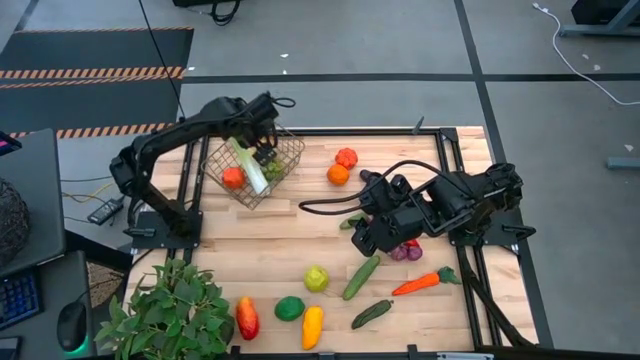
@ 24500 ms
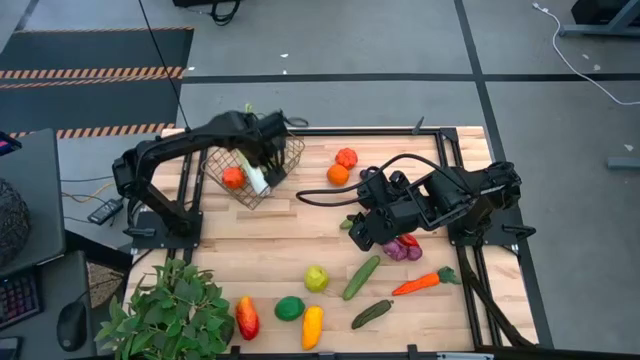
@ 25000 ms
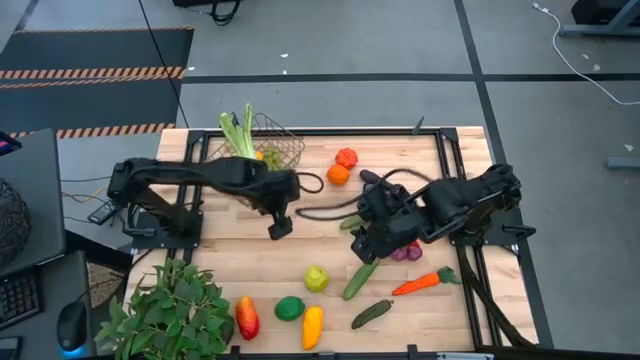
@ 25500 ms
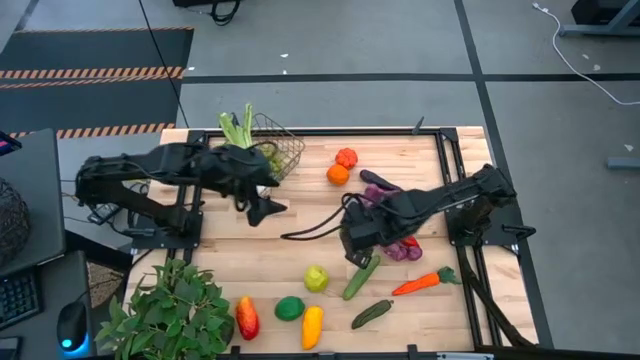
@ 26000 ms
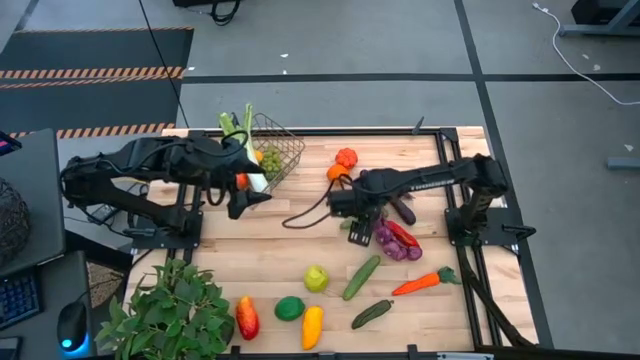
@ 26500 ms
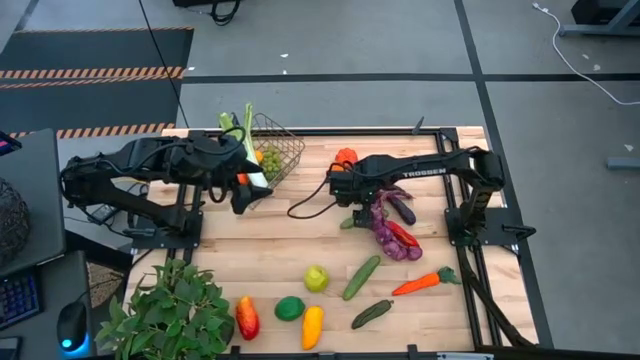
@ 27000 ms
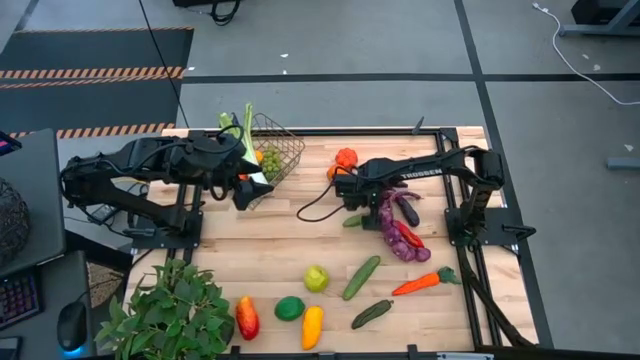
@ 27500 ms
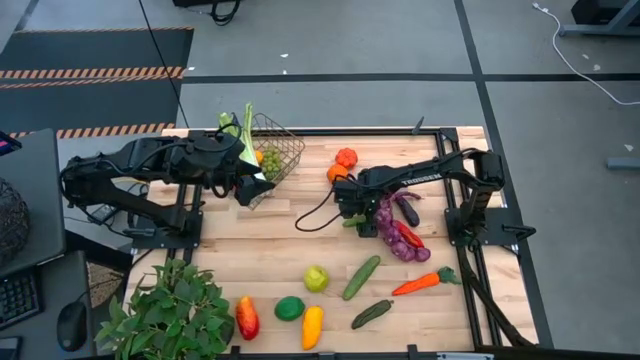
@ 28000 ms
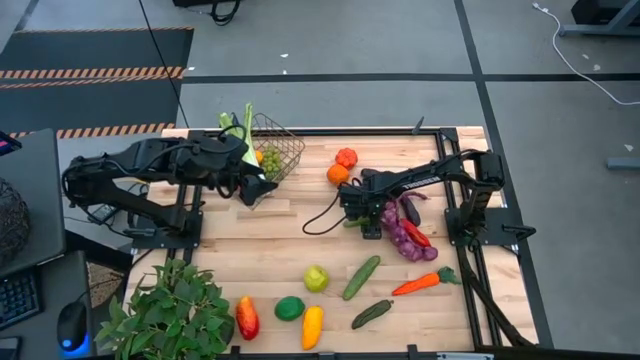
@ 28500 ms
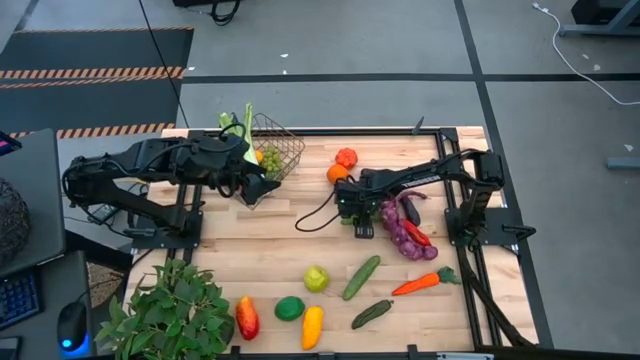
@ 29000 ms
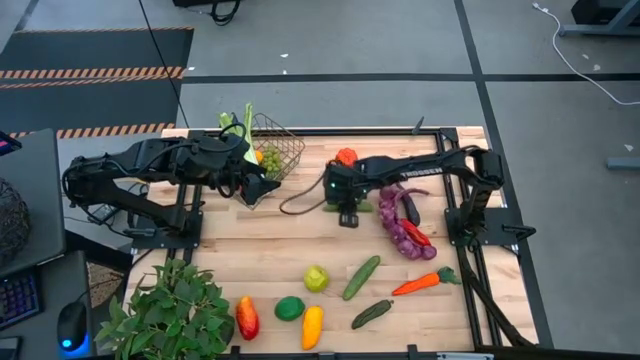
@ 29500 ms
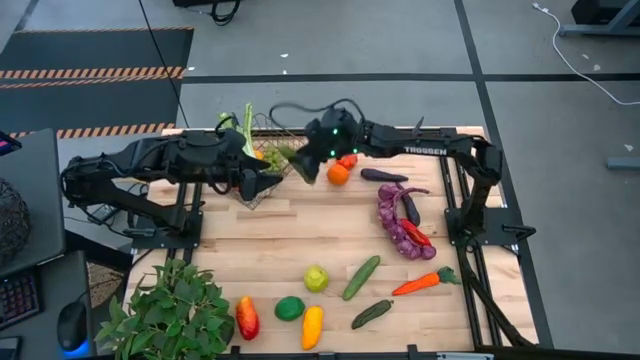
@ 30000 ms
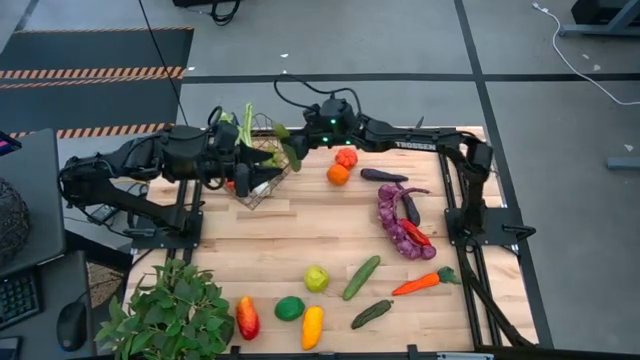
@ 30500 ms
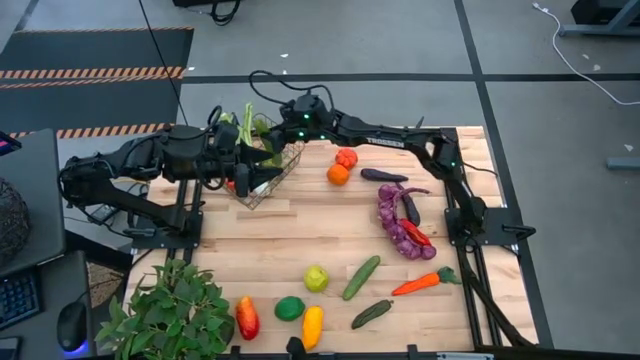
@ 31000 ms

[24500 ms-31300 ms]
Task: Build produce basket
Put the top cucumber into the wire basket

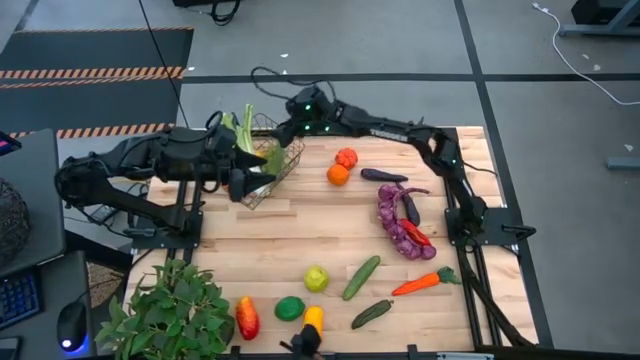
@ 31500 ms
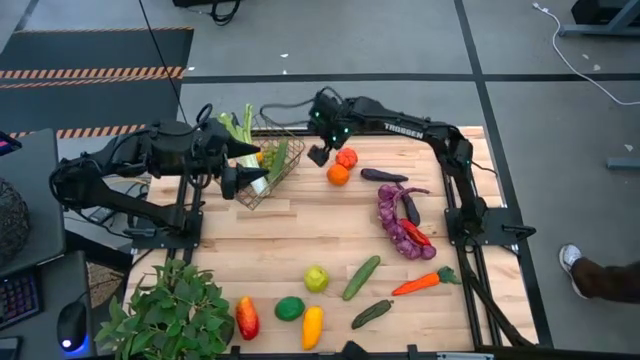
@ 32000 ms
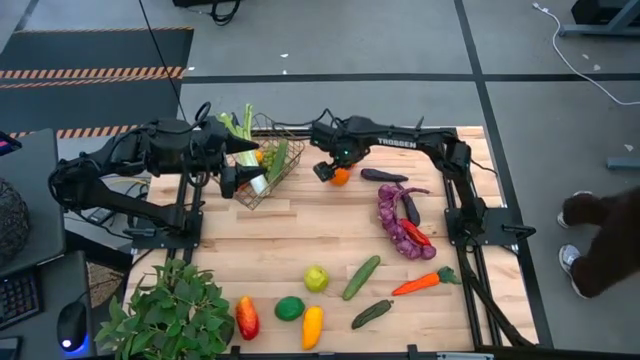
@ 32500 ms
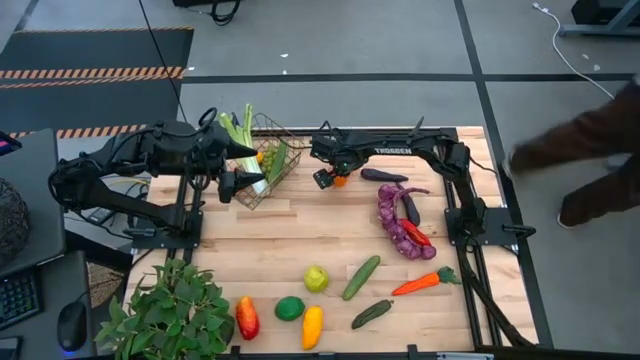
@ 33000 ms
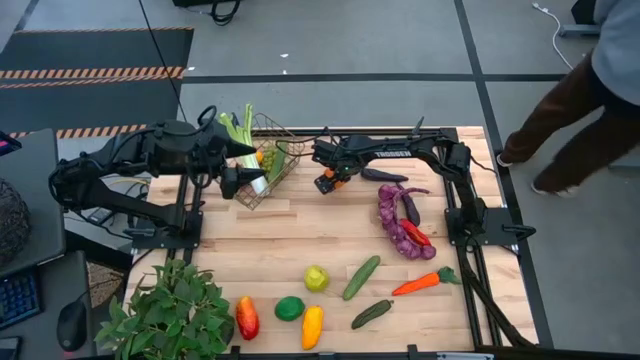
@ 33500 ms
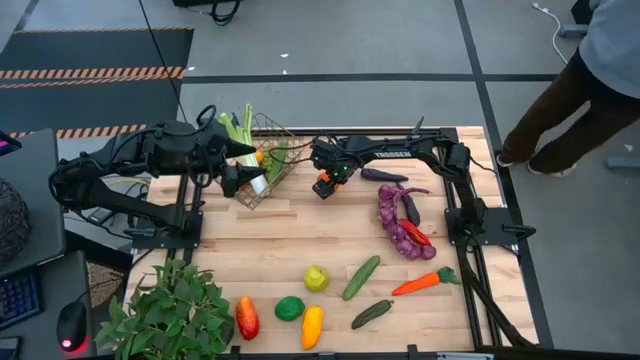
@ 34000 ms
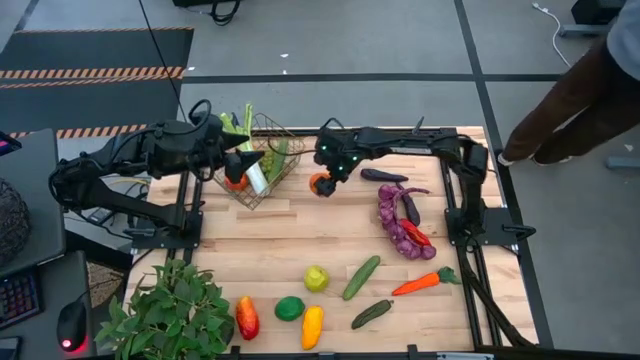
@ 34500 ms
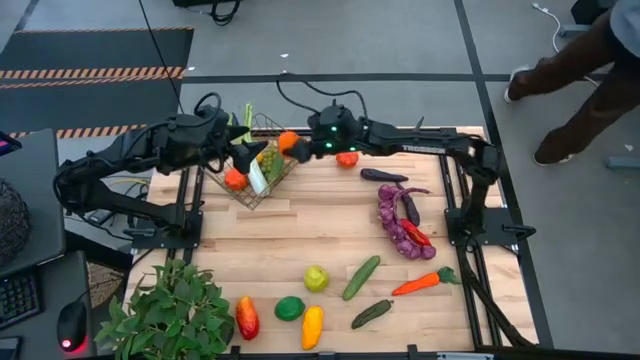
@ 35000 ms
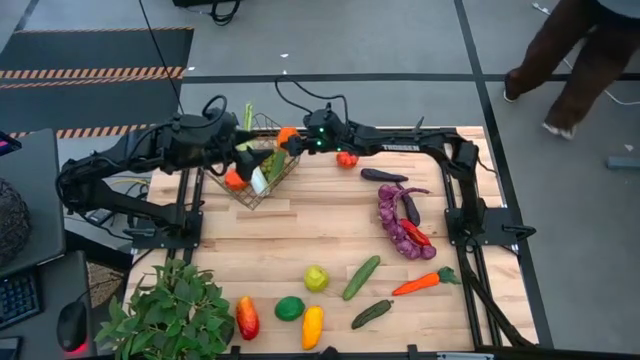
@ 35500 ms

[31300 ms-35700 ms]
Put the orange into the wire basket

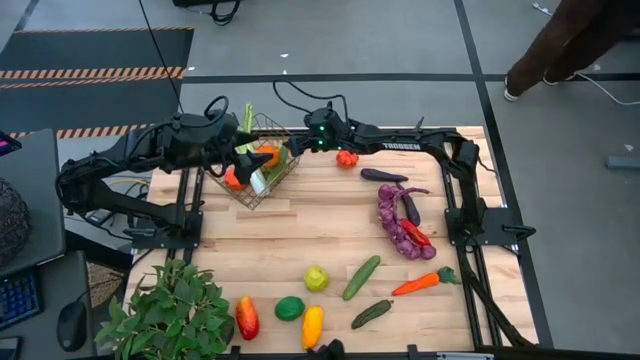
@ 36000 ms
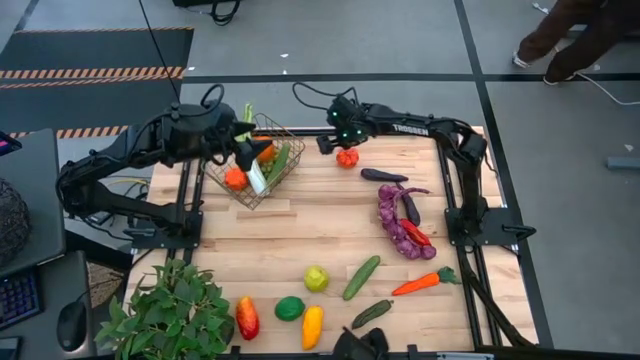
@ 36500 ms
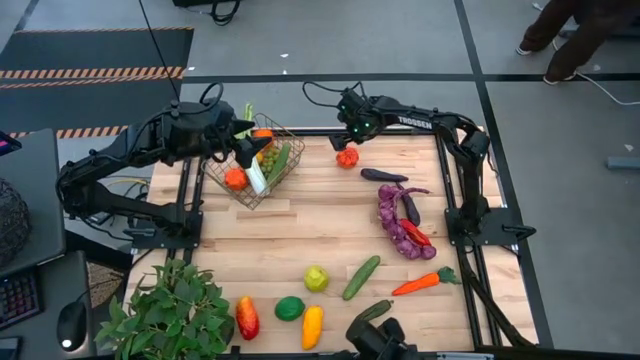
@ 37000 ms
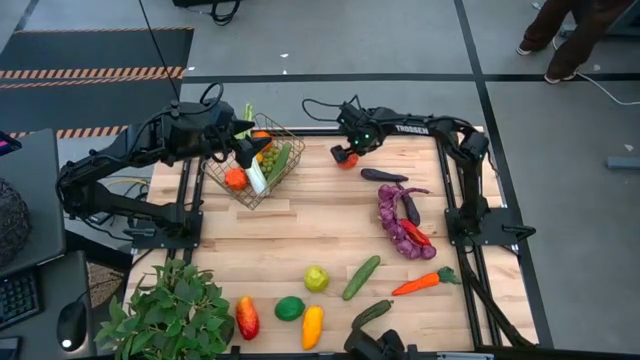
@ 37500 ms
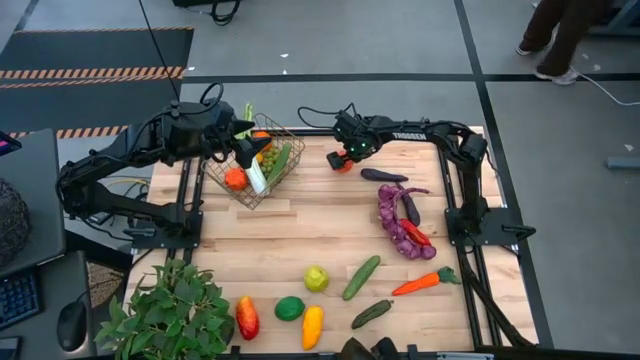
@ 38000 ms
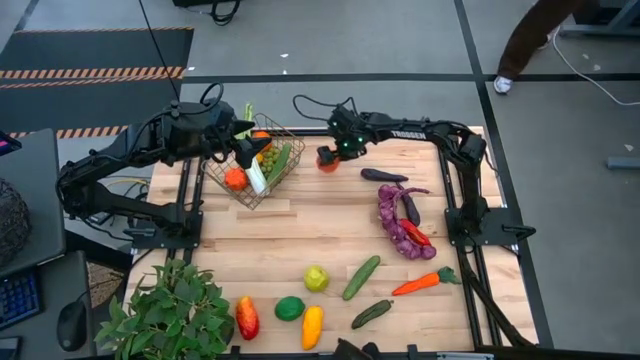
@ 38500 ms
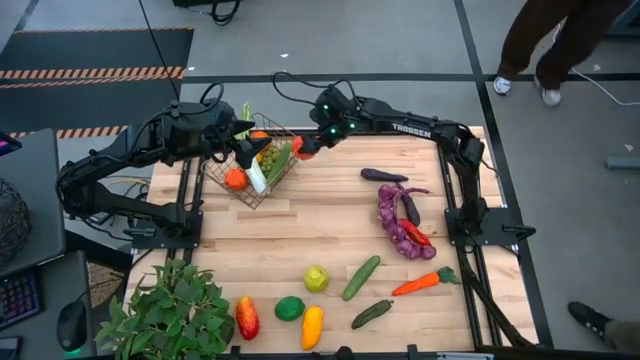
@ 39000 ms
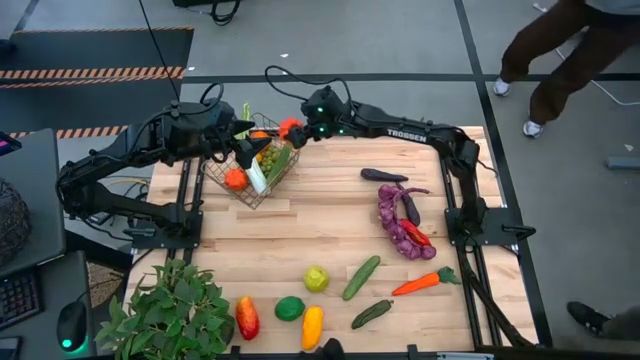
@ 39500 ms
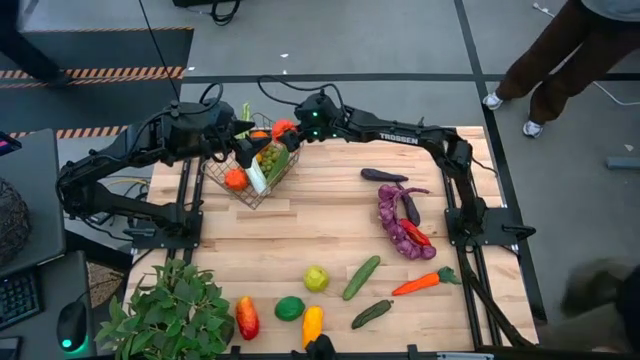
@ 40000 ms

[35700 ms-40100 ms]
Put the squash into the wire basket

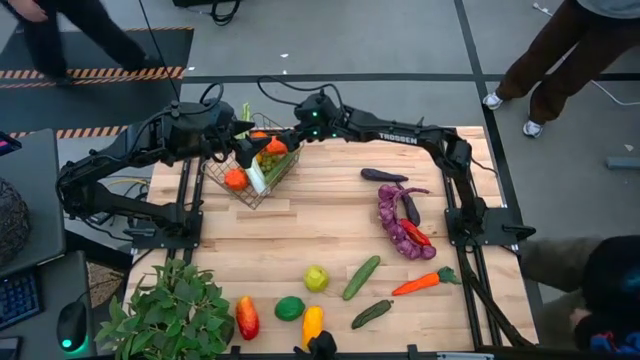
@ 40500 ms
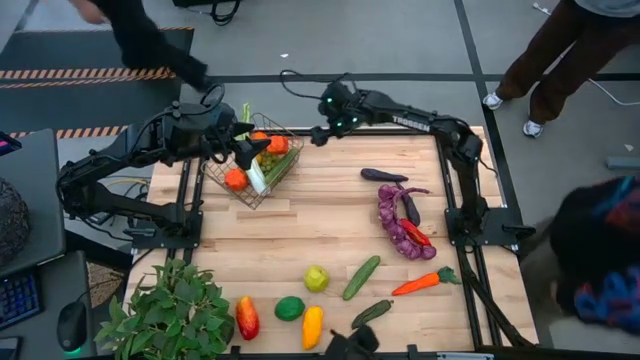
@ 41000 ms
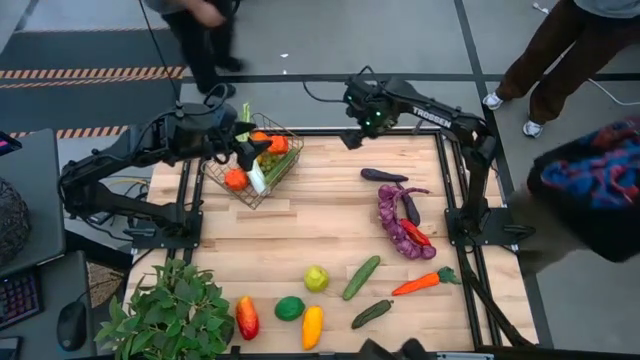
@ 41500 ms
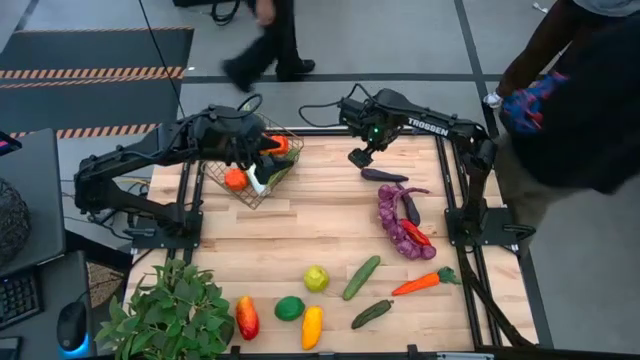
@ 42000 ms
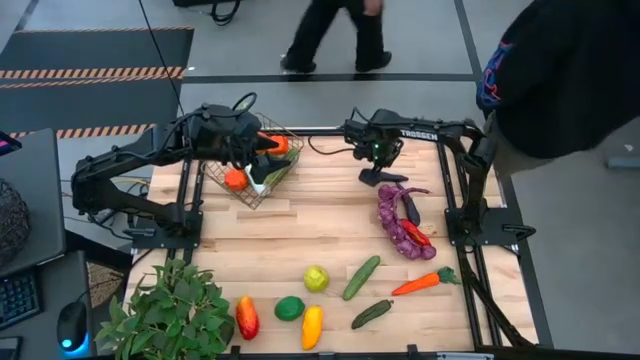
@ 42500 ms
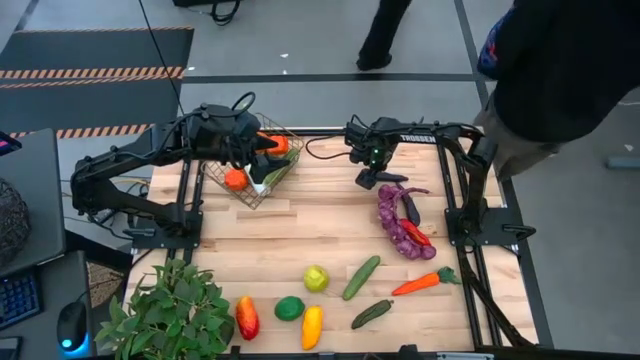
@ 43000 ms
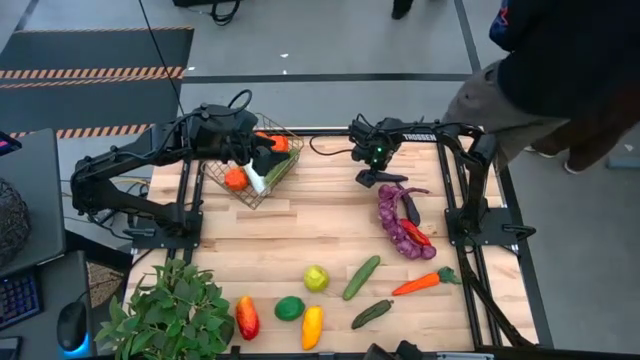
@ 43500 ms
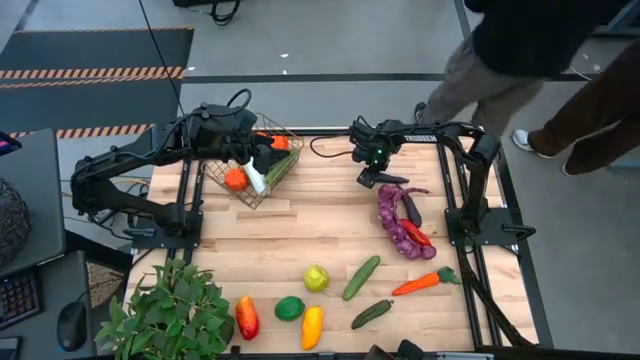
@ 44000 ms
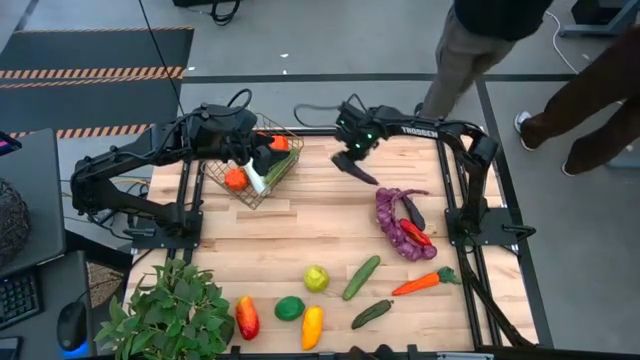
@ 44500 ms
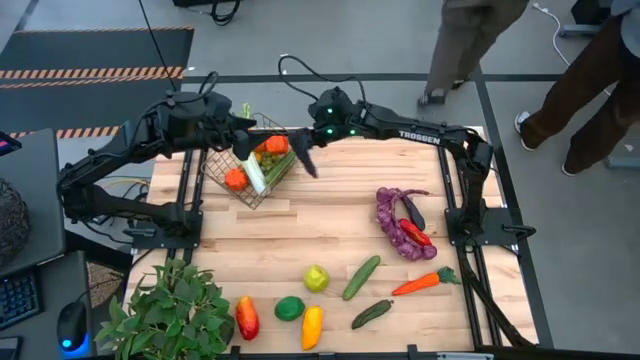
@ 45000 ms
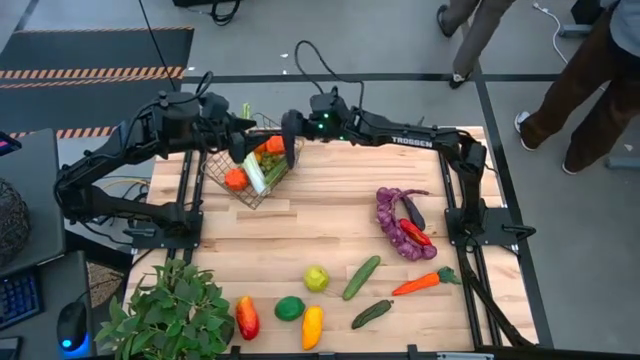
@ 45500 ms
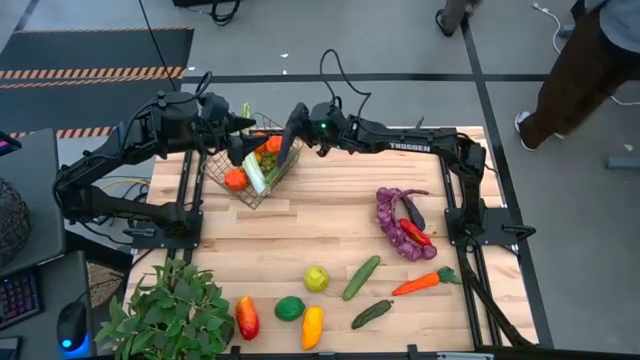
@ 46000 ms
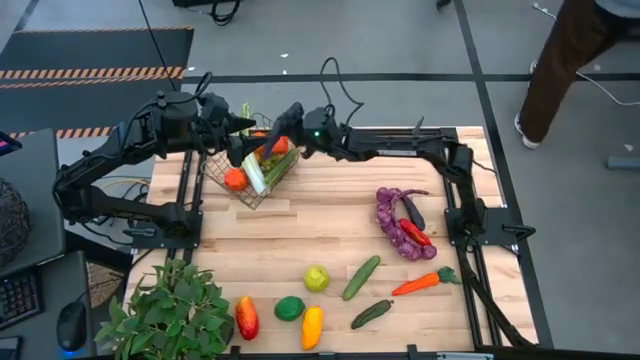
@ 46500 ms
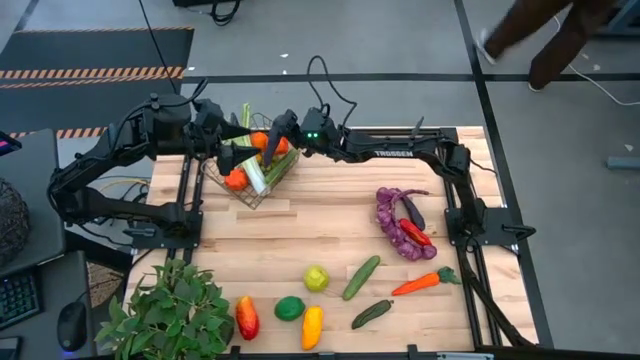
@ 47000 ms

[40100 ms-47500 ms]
Put the top eggplant into the wire basket
